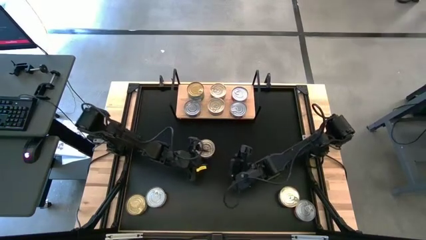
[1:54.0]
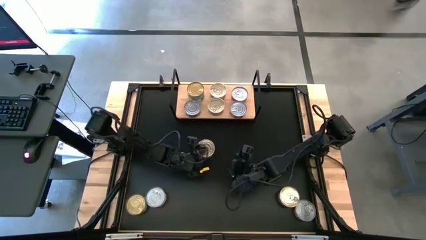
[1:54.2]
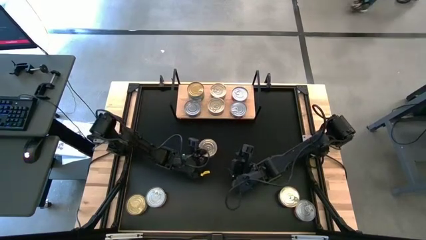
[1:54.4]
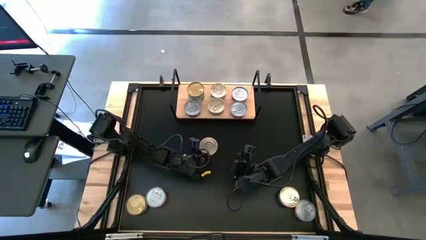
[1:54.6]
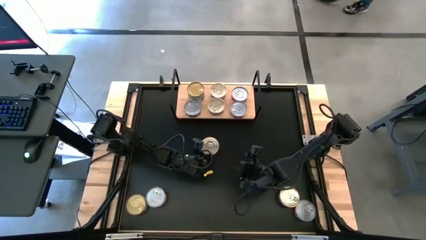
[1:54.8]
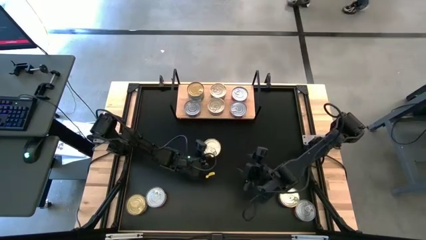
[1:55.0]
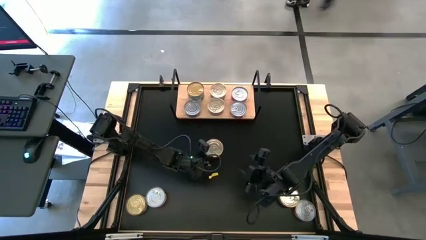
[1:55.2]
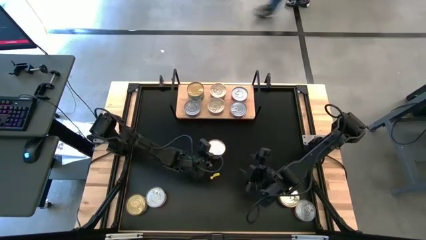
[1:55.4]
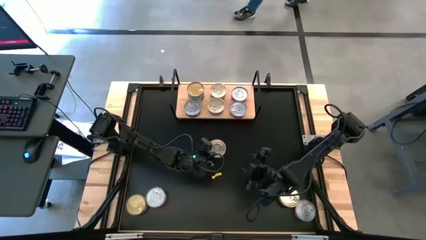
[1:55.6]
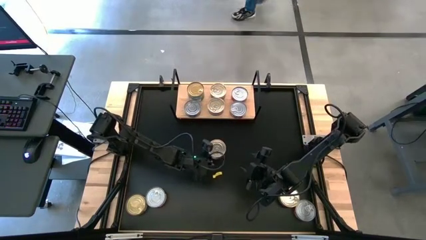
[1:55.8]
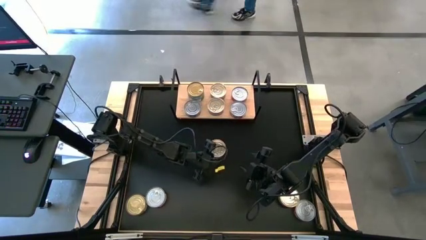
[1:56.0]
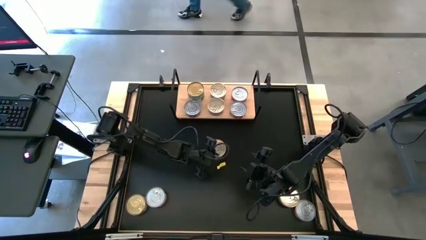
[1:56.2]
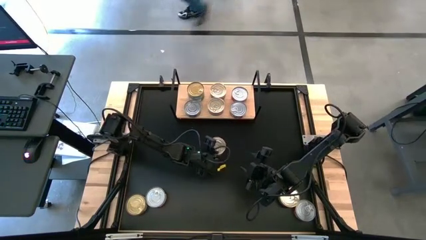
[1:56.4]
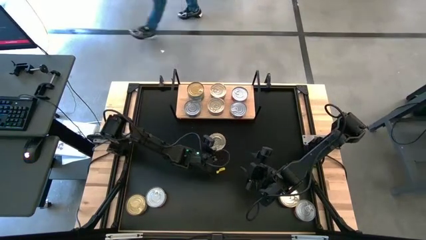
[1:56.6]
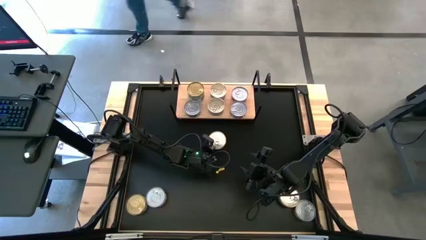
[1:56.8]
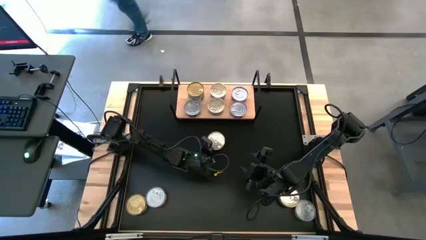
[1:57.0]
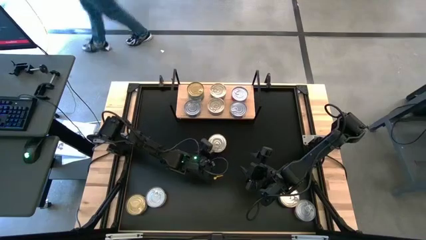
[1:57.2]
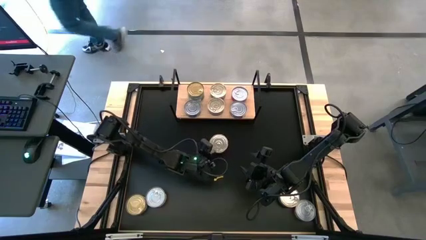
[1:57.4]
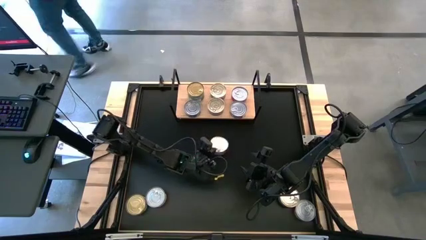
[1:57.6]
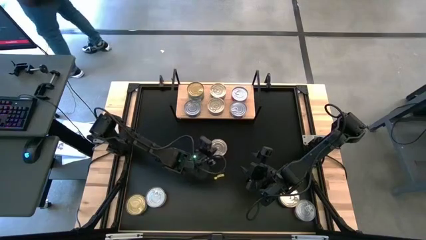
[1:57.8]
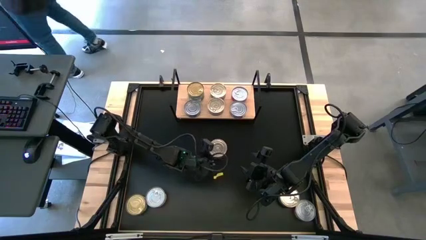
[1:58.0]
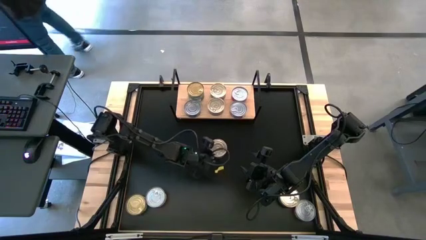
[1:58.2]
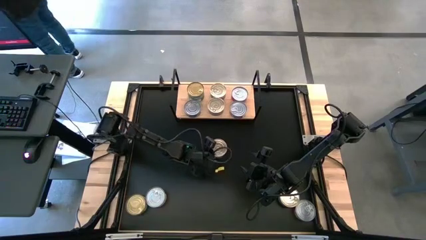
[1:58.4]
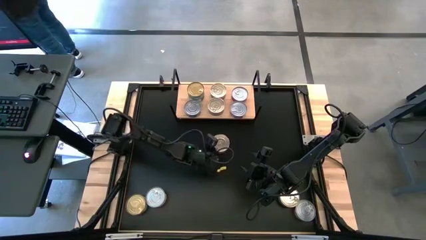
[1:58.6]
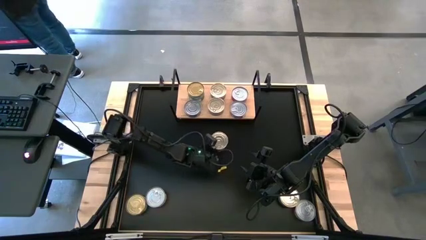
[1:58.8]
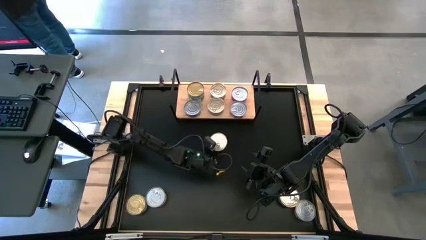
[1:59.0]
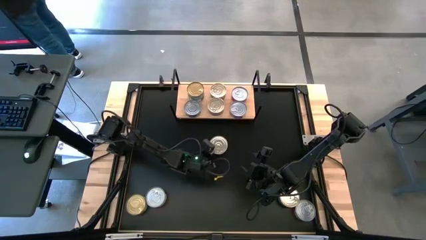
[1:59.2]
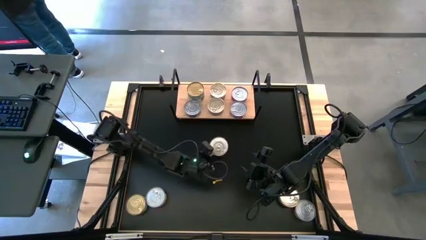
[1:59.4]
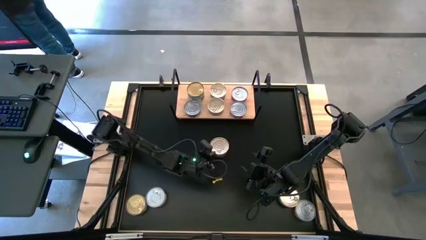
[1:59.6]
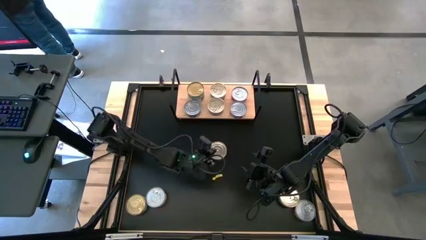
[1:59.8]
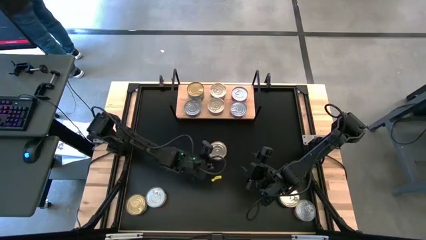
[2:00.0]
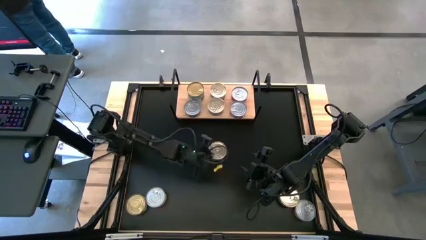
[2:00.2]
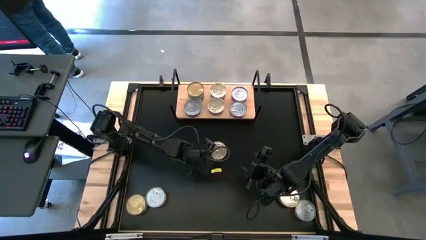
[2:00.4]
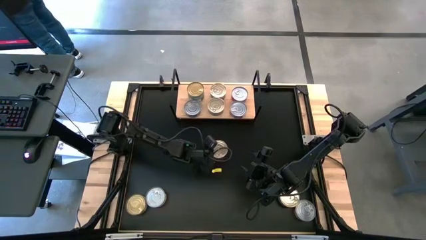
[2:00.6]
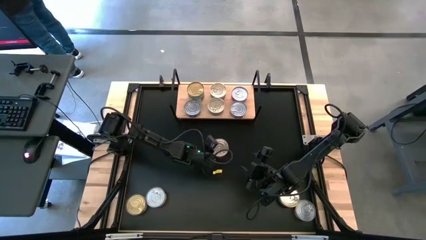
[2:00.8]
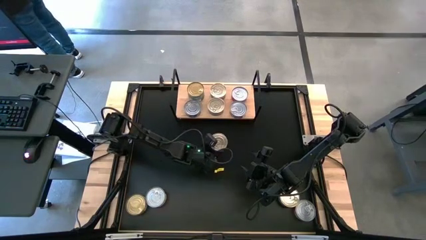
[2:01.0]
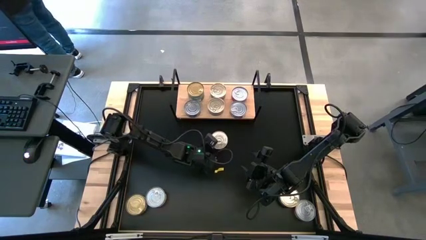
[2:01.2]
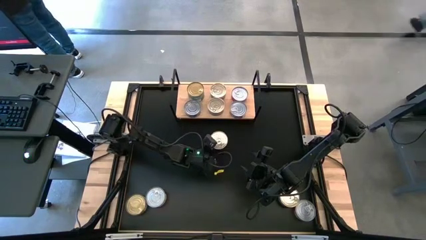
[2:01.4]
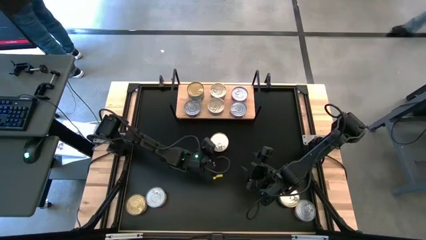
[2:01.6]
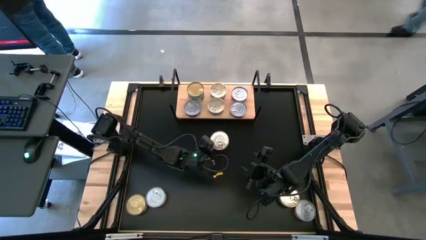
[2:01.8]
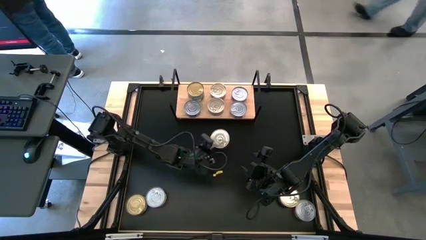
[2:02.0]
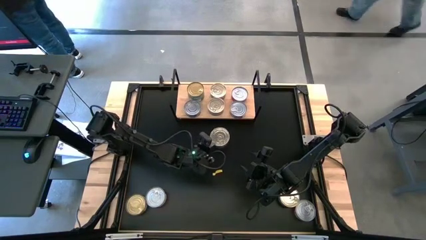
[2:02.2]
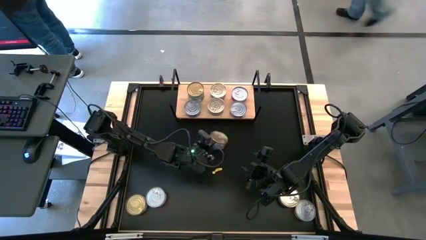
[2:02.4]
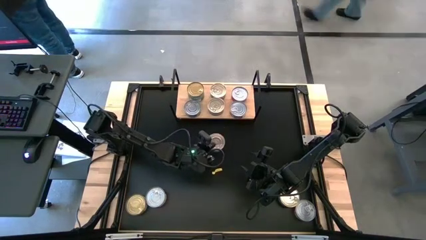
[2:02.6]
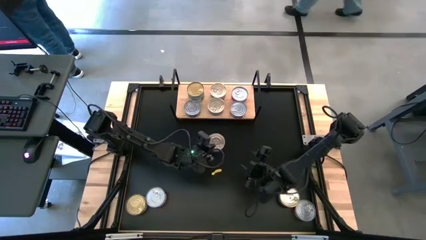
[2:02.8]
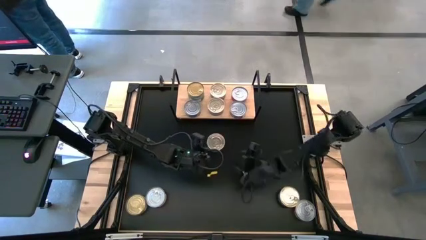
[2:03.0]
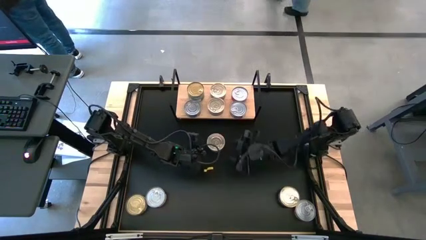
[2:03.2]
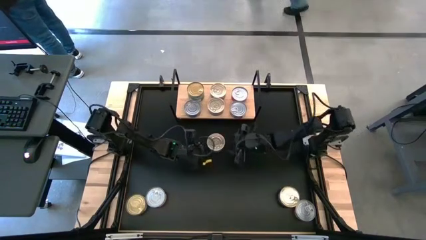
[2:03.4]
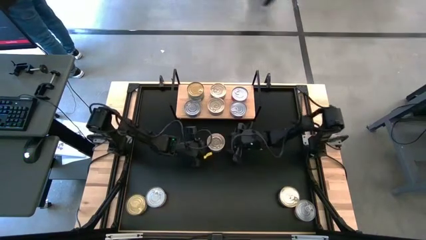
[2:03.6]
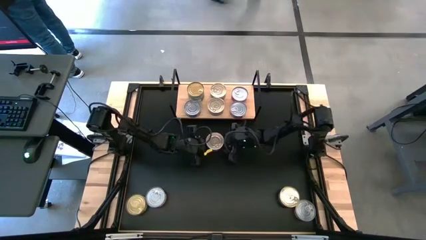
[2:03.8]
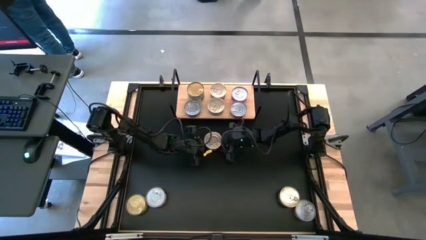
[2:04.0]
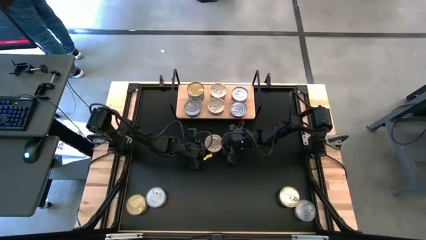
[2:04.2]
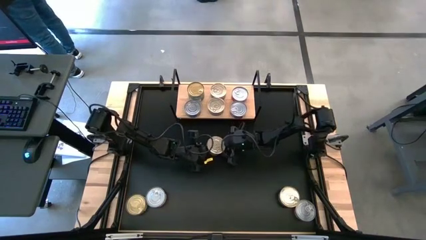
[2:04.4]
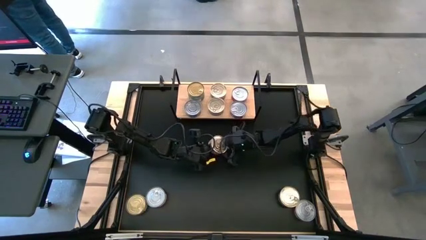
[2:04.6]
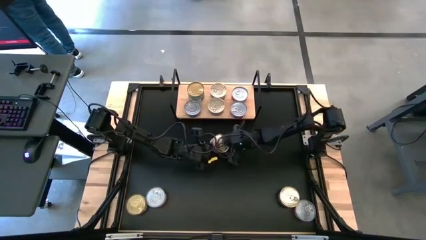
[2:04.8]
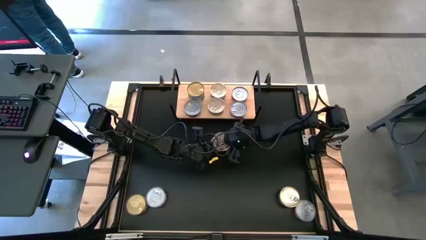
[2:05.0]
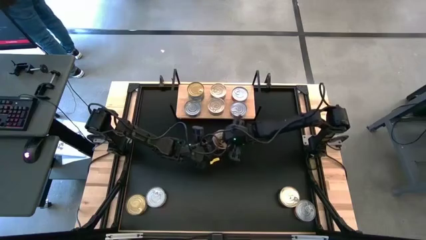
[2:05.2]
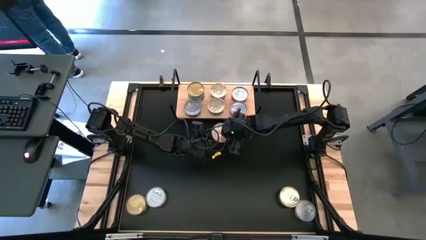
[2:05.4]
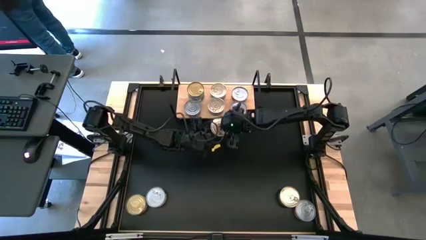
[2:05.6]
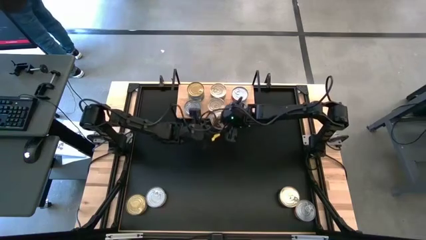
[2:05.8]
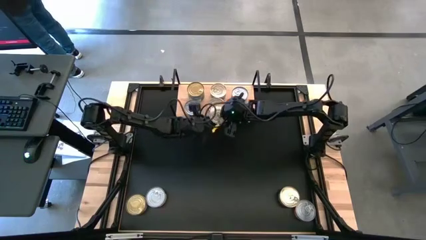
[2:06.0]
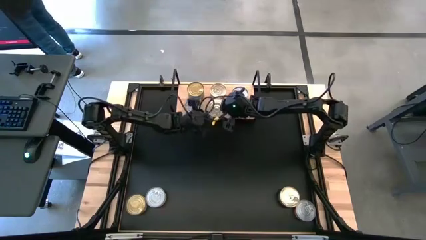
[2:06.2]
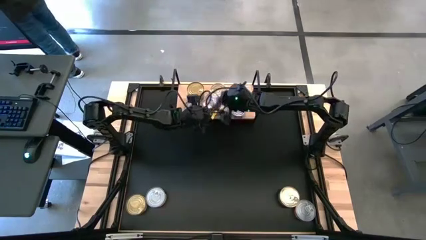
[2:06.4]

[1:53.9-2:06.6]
Task: Stack canned seafood by type on shelf
Stack the blue-pink tuna can on top of other blue-pink tuna can on the shelf

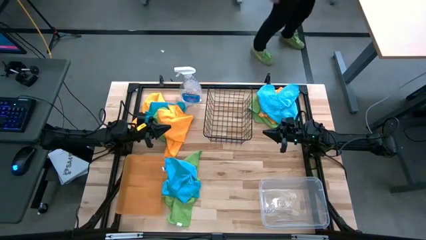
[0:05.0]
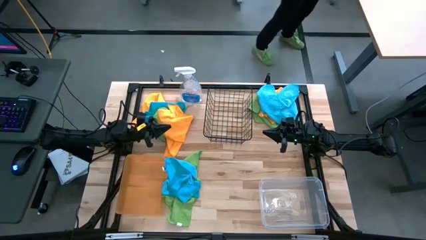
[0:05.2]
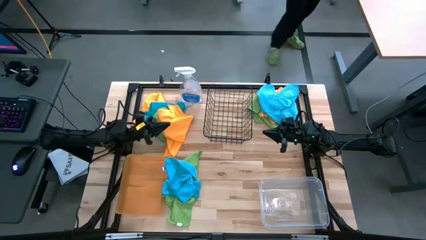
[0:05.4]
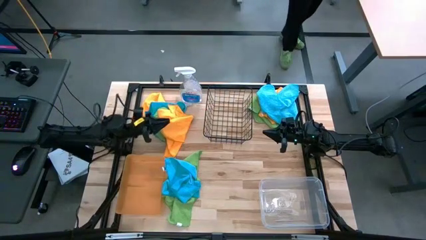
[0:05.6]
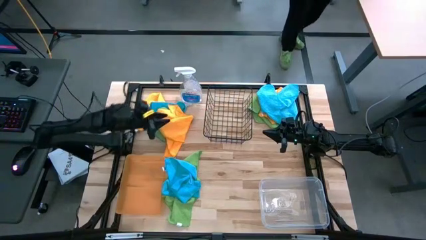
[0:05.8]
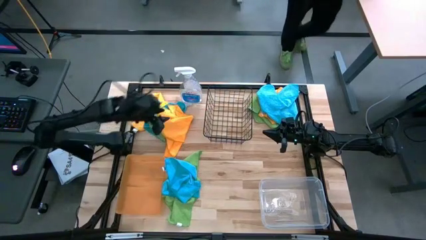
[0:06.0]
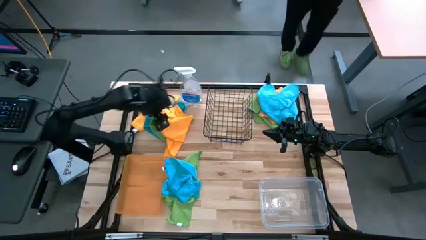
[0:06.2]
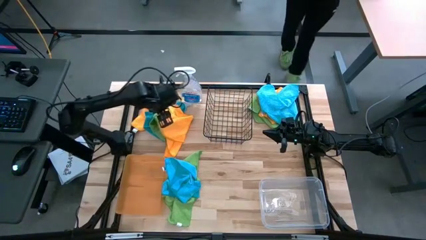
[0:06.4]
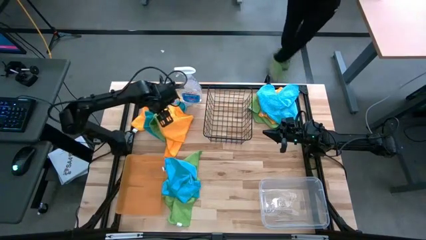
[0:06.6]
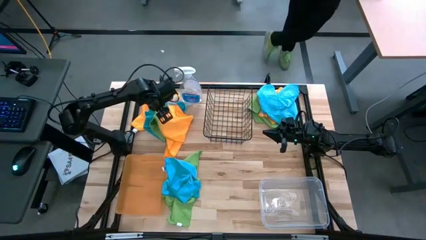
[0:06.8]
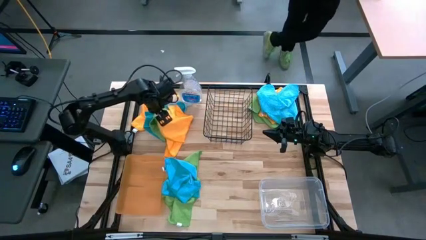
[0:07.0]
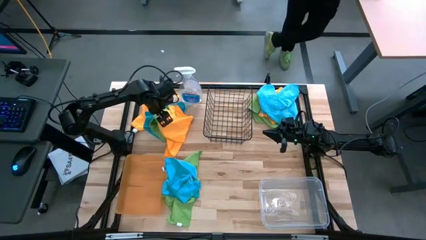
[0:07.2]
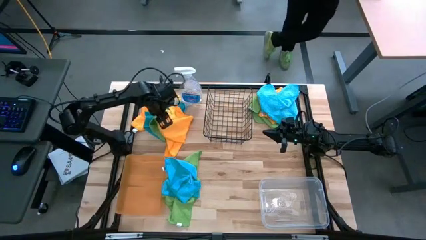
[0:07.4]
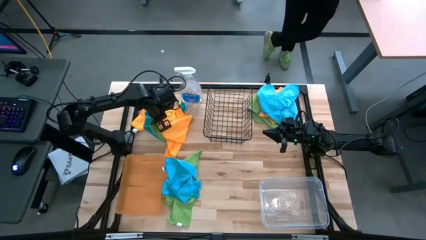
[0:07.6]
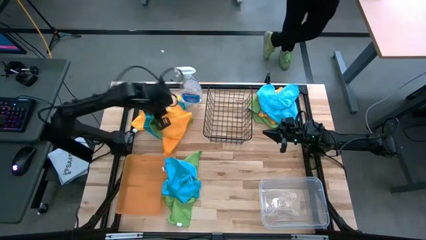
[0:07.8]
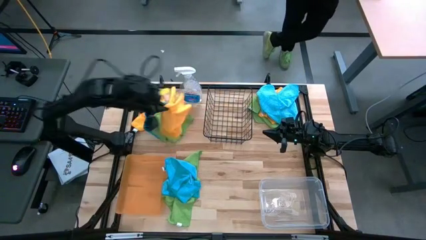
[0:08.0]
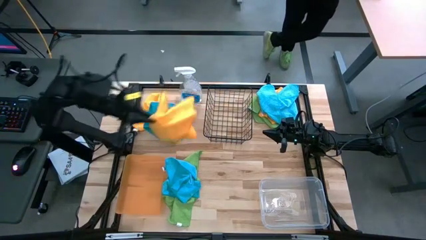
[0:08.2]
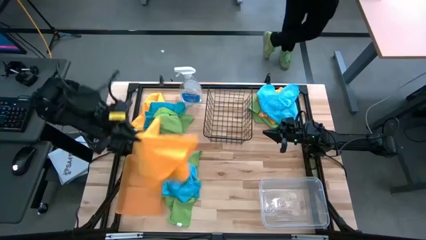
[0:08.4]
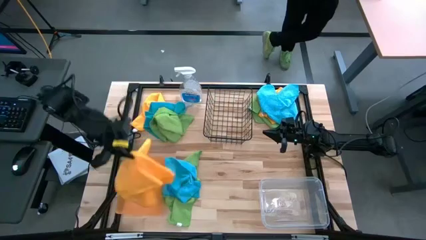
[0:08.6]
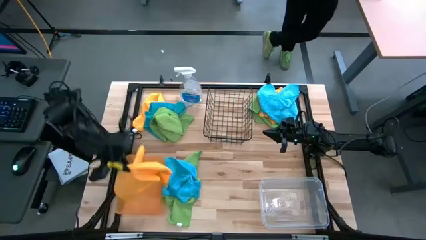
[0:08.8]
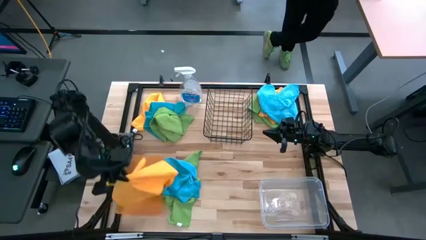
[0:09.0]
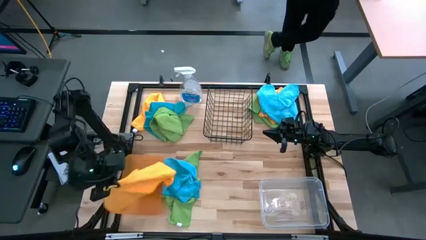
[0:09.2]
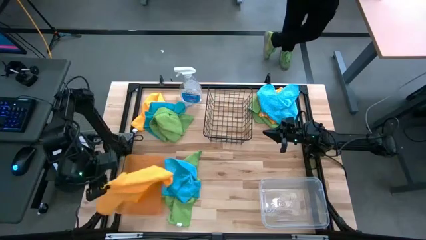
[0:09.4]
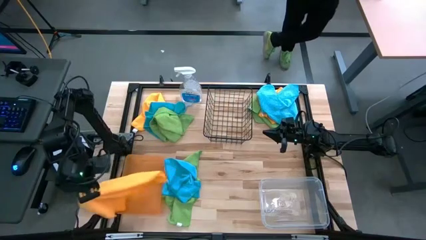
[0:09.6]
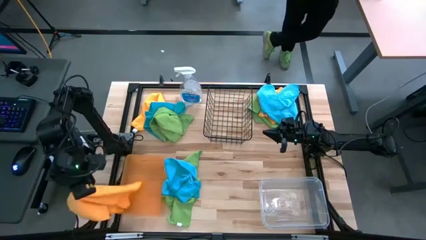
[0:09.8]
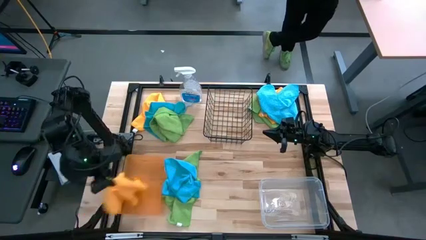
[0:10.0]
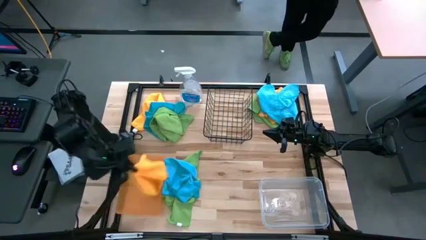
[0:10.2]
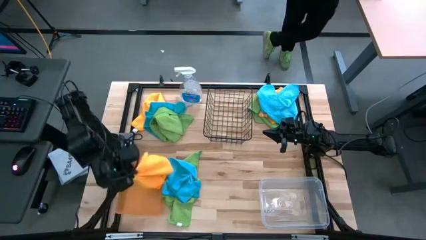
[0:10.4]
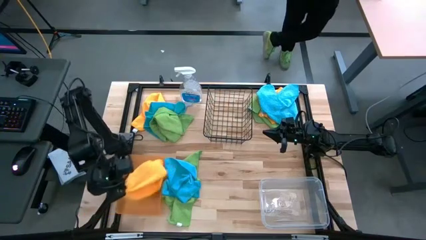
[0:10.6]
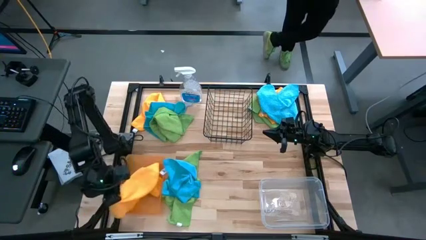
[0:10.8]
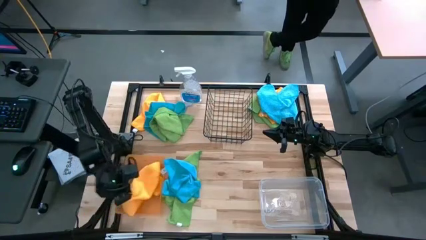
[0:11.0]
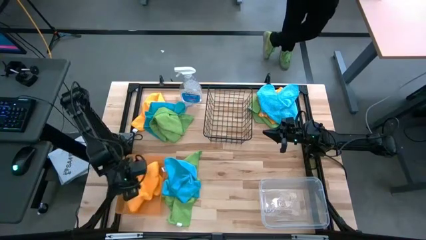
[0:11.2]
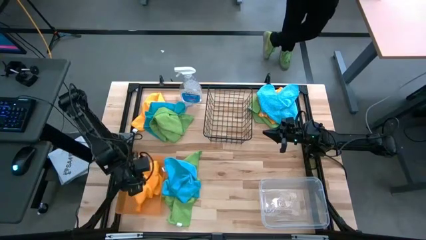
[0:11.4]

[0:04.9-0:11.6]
Task: Sort microfiber towel by color & place in baskets
Put the top left orange towel into the orange bin
